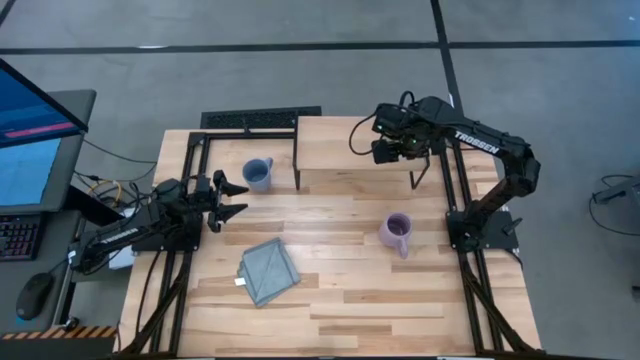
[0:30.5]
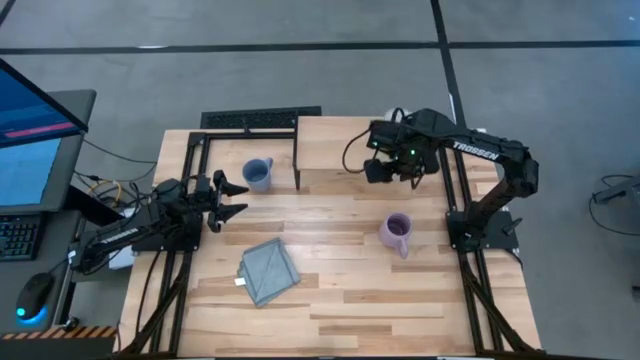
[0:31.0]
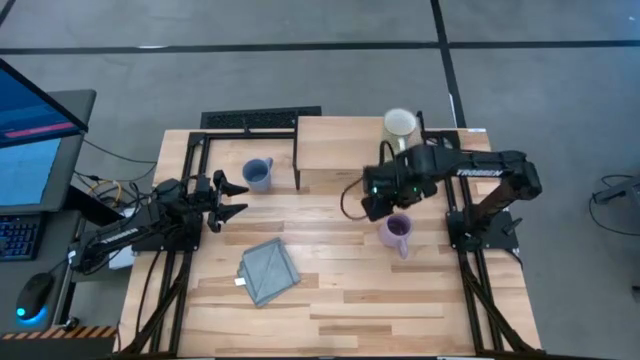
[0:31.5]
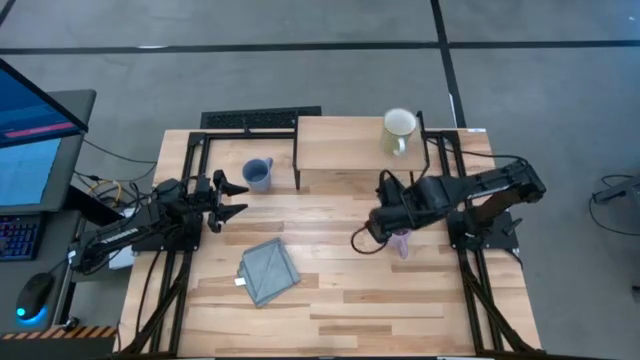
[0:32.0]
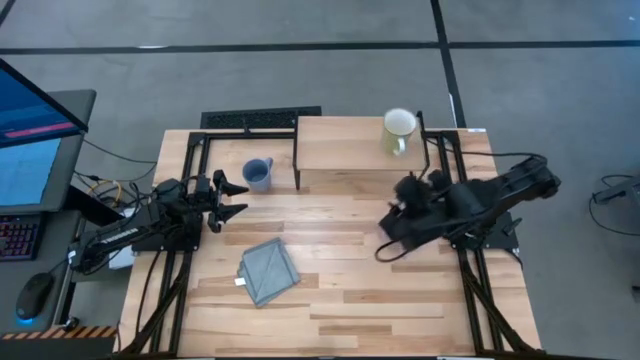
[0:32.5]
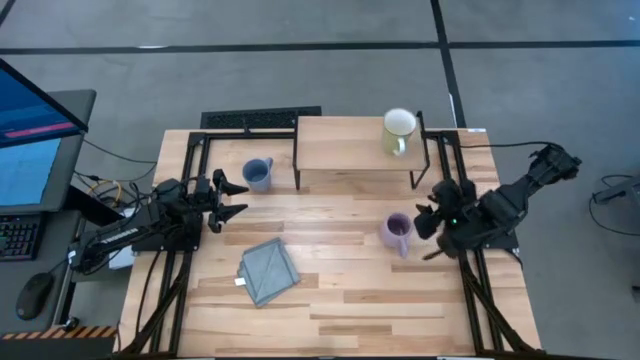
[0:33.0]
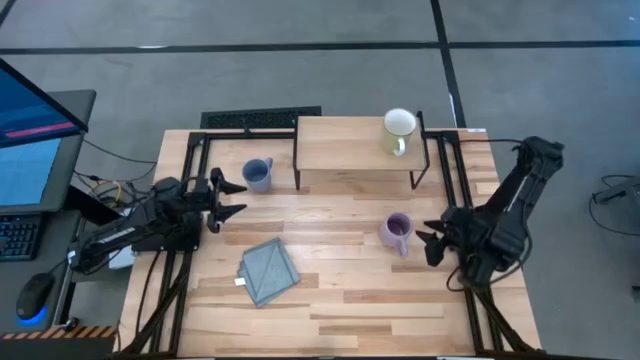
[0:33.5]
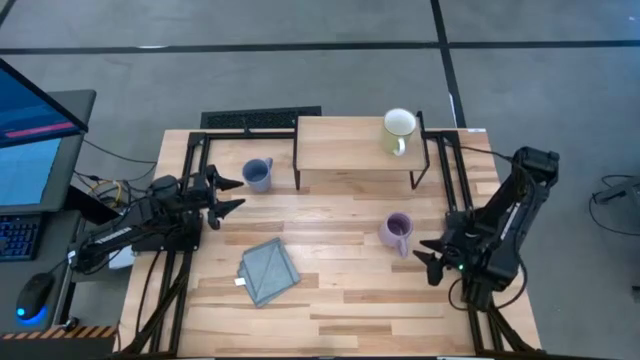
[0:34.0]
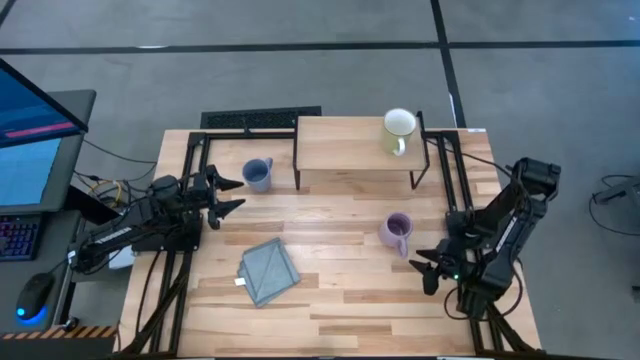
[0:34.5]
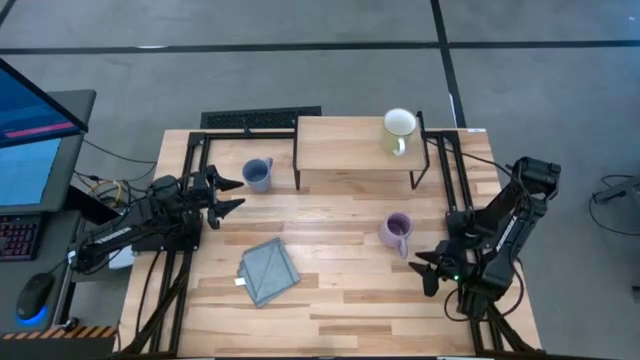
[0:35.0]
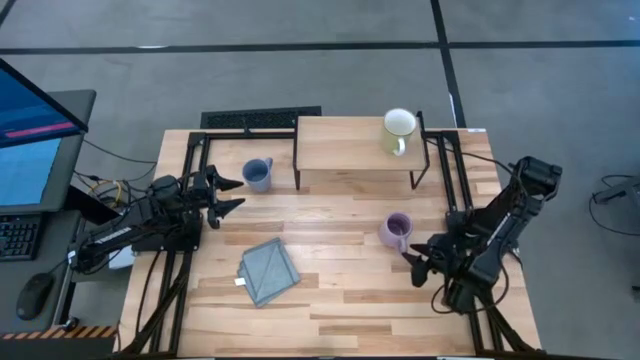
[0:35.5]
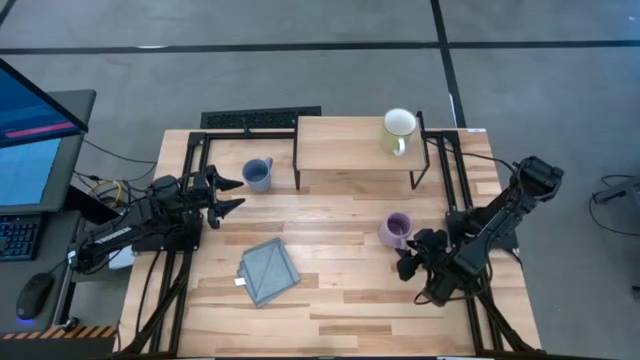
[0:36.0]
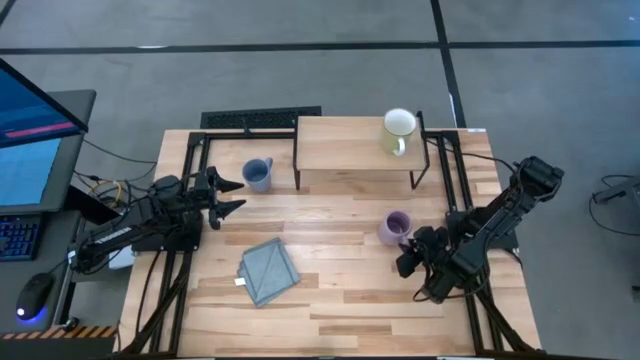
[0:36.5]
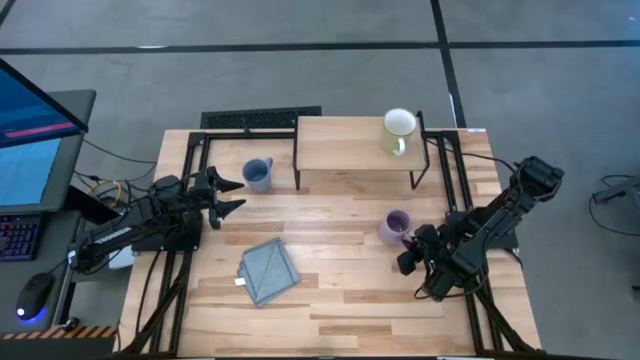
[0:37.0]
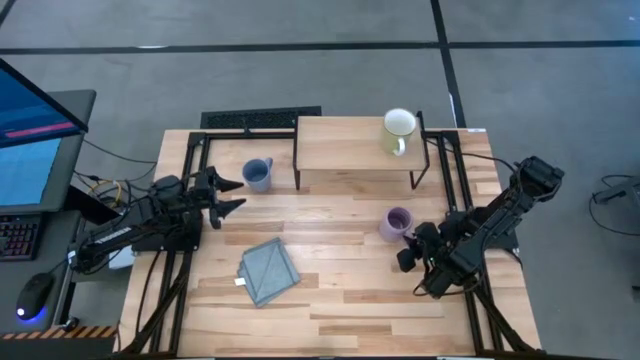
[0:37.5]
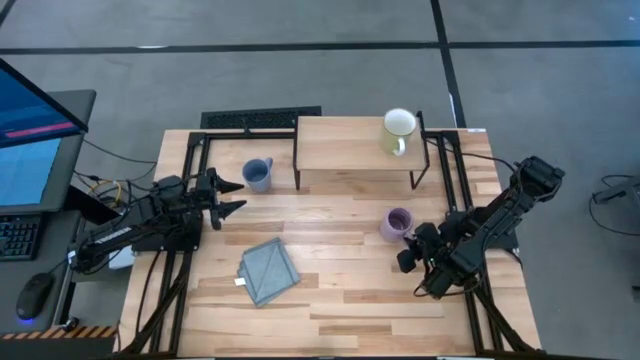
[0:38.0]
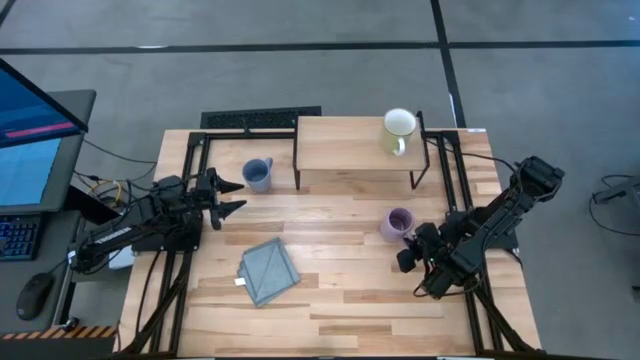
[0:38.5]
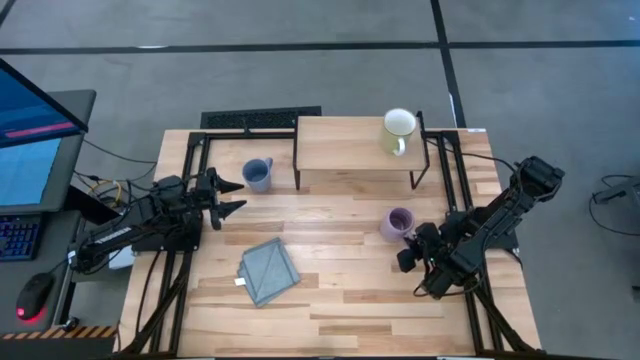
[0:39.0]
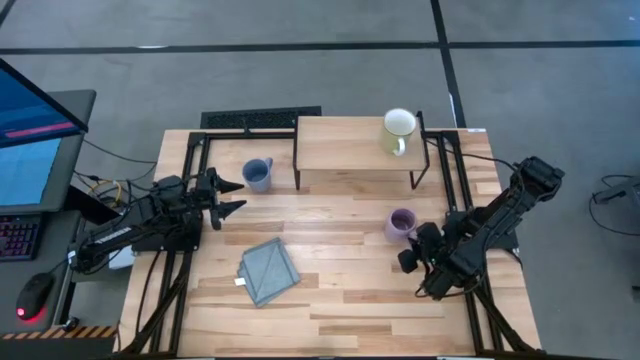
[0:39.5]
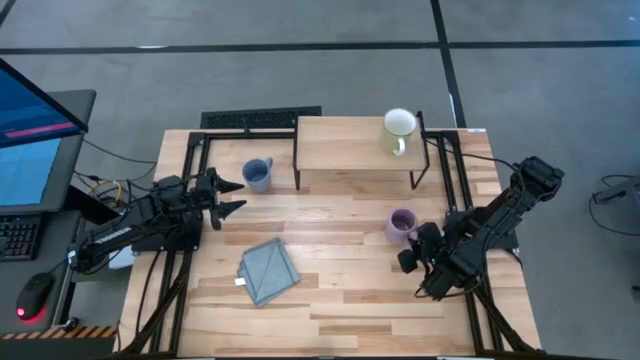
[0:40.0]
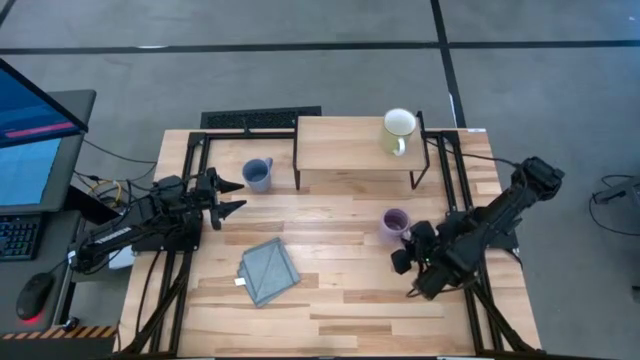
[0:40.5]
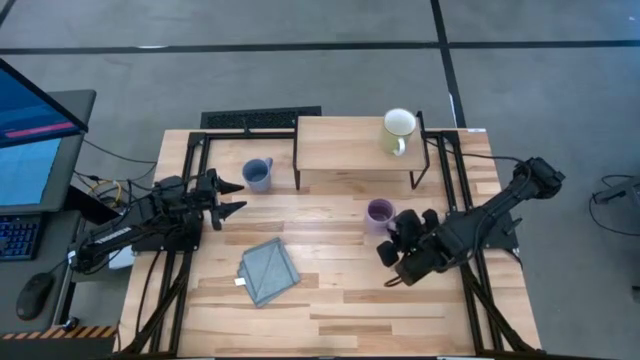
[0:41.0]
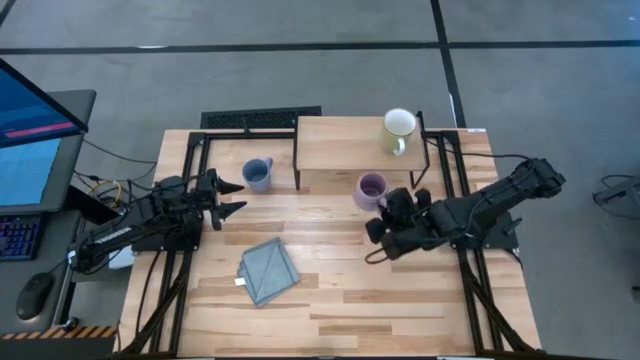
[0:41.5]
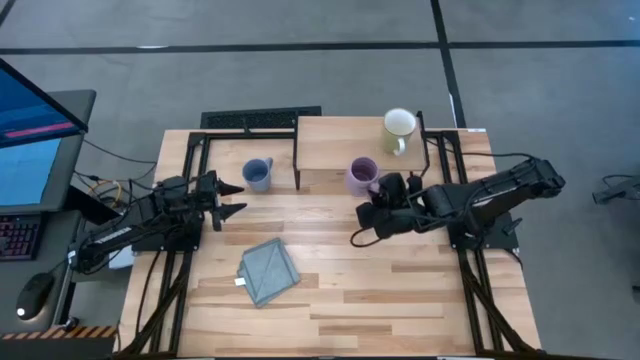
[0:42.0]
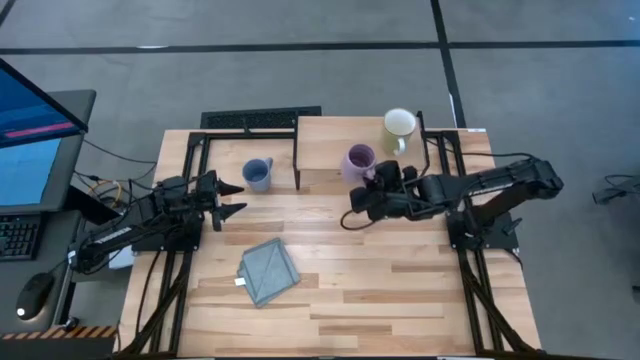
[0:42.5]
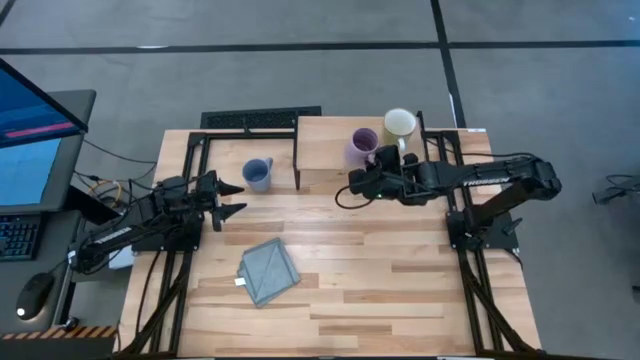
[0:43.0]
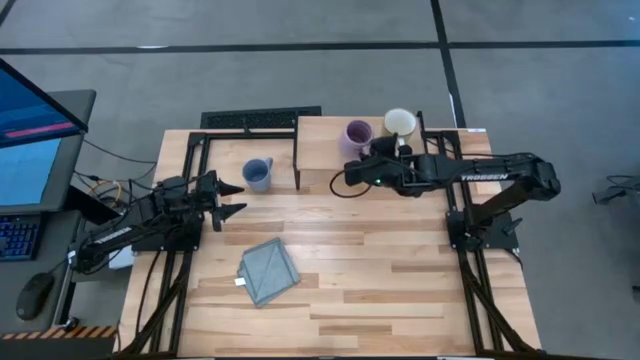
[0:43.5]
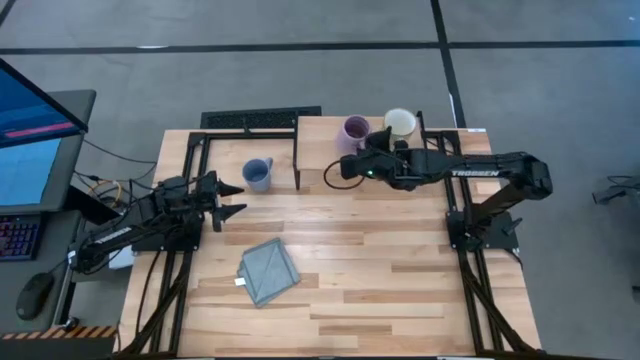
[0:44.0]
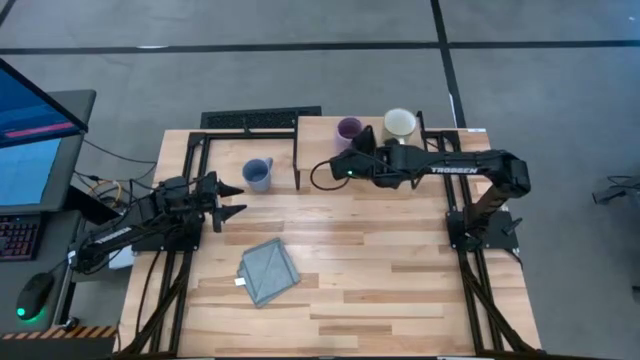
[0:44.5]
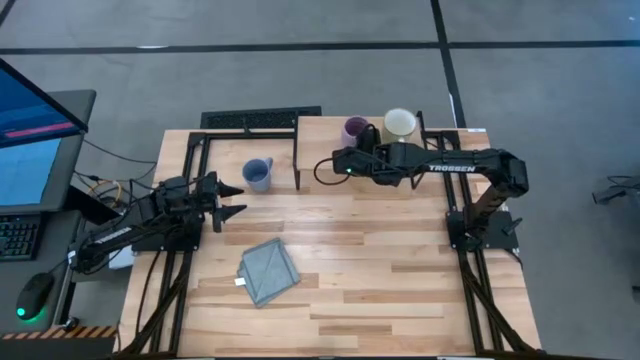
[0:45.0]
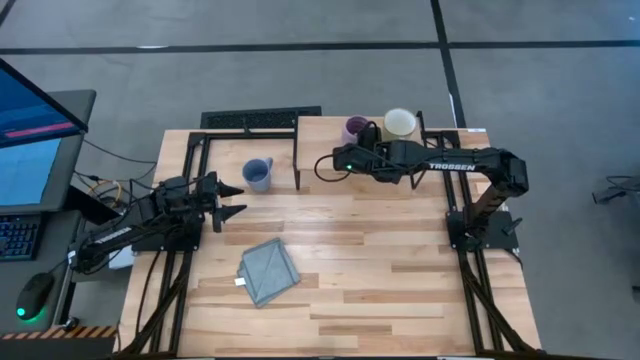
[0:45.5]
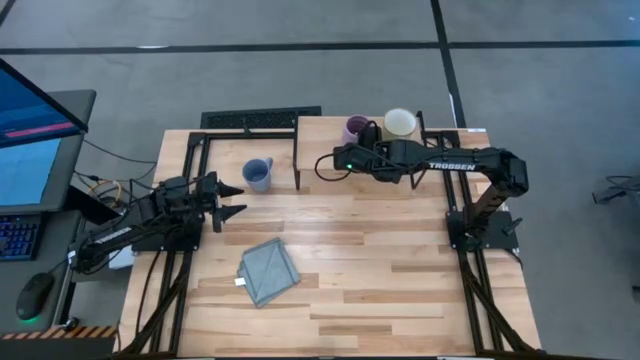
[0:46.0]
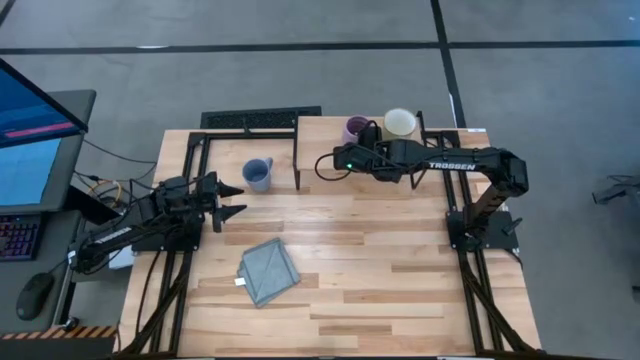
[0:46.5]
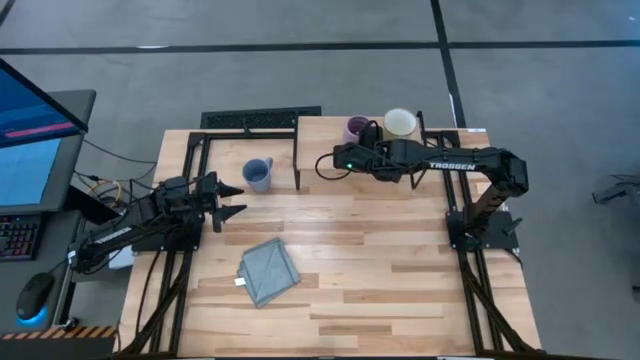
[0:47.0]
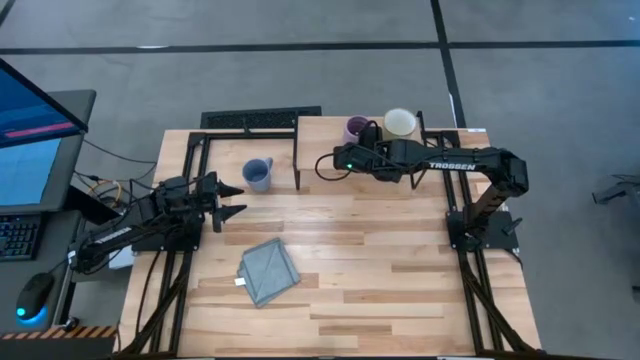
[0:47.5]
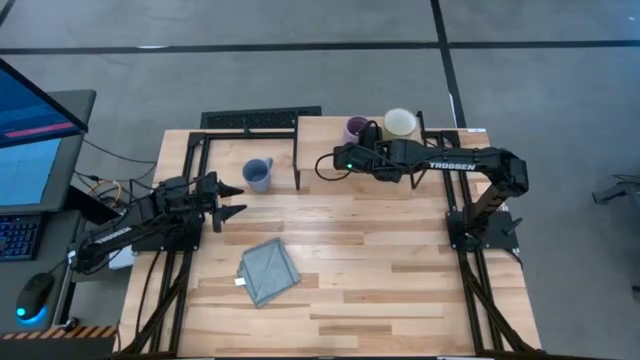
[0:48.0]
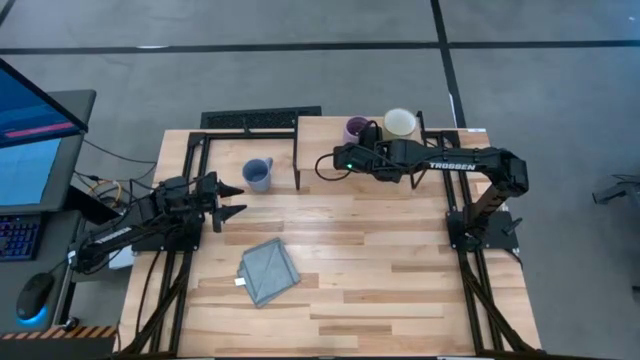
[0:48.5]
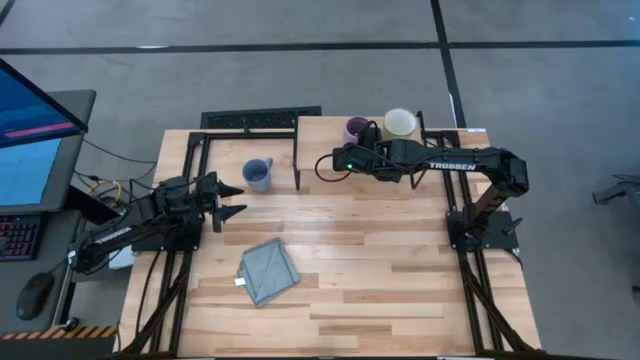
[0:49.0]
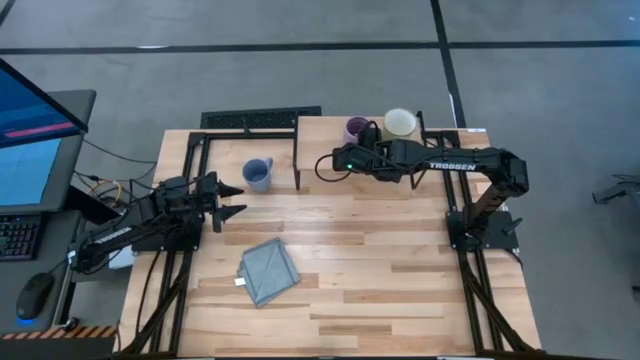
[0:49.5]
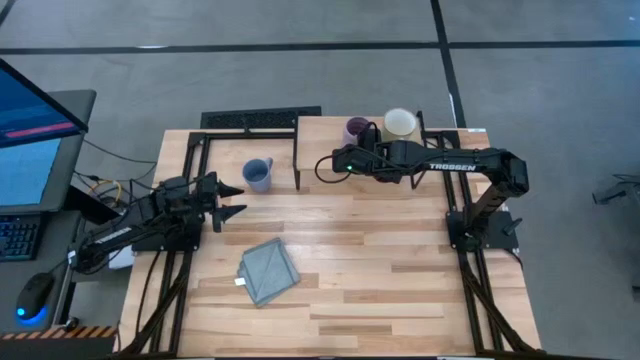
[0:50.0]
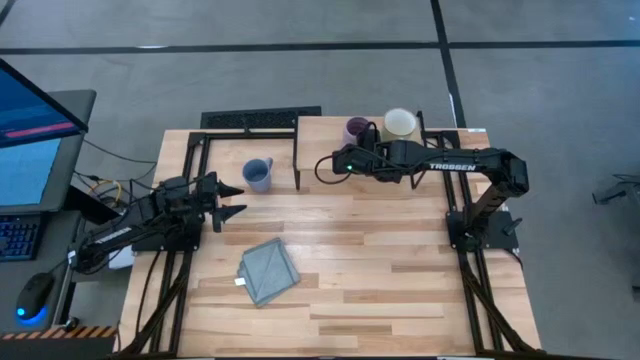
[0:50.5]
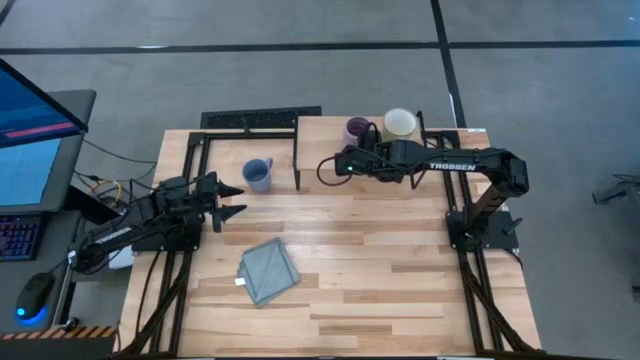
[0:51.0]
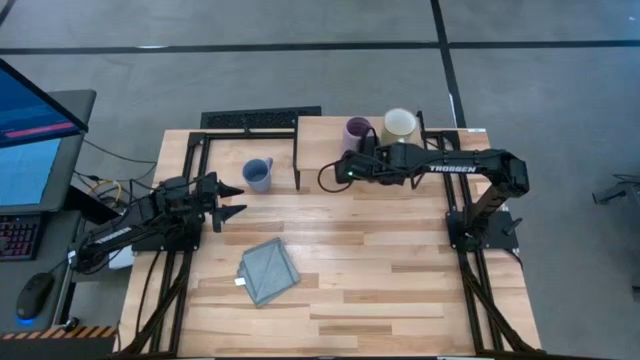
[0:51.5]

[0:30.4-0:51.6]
Task: Stack small to large cups/mugs on shelf
Put the violet mug on the shelf
